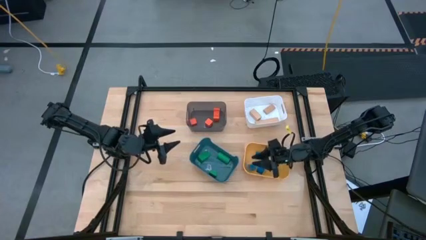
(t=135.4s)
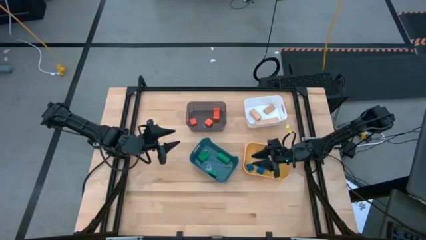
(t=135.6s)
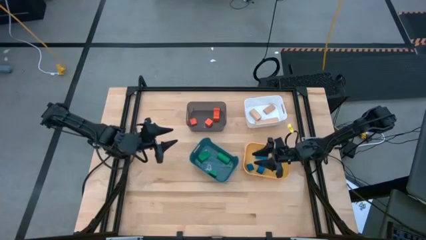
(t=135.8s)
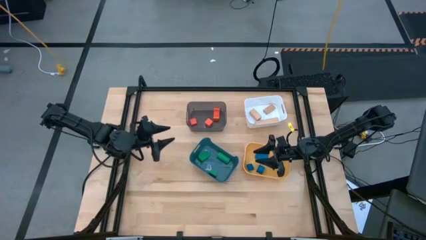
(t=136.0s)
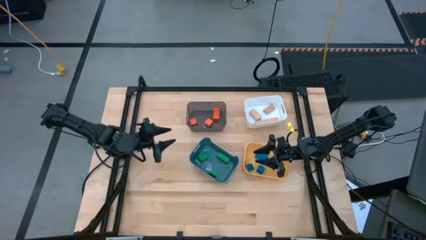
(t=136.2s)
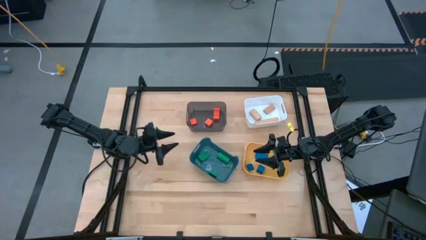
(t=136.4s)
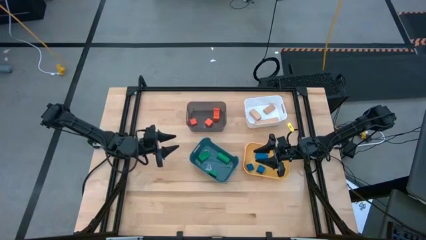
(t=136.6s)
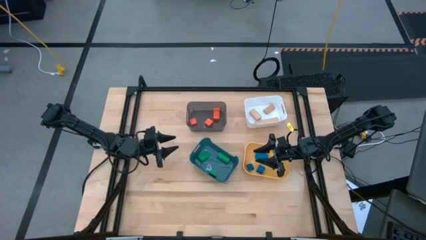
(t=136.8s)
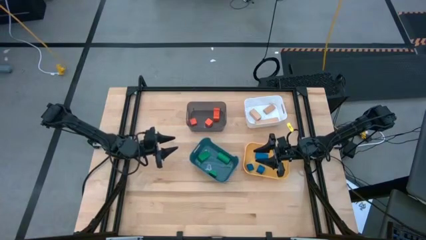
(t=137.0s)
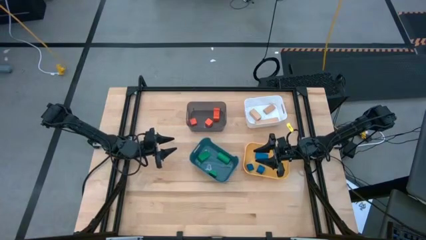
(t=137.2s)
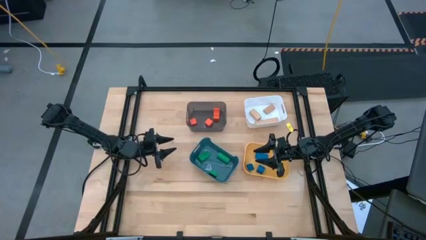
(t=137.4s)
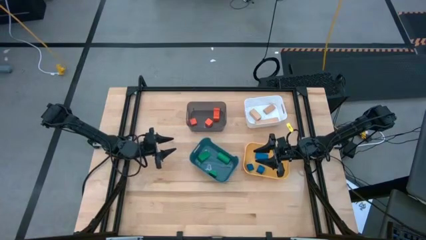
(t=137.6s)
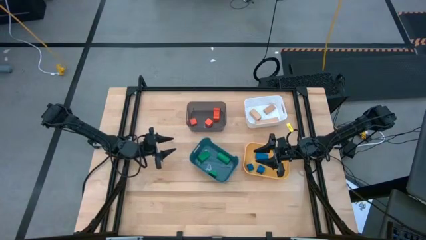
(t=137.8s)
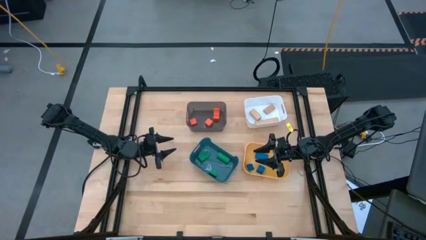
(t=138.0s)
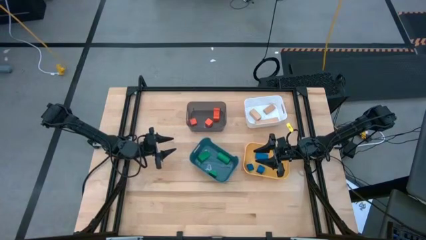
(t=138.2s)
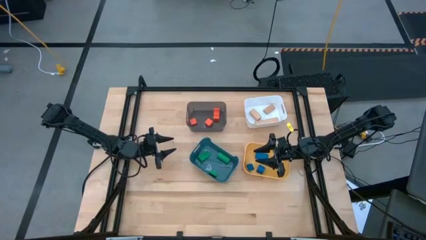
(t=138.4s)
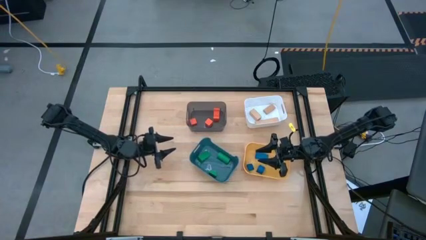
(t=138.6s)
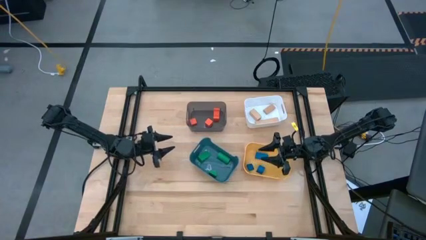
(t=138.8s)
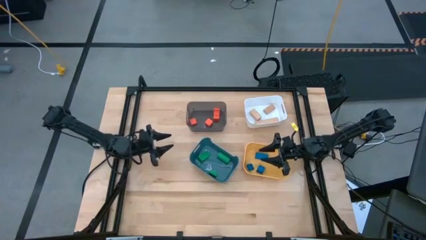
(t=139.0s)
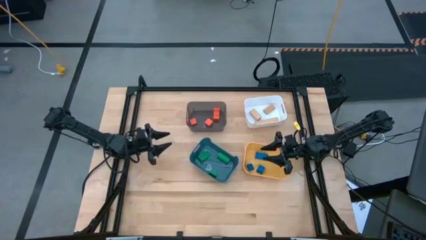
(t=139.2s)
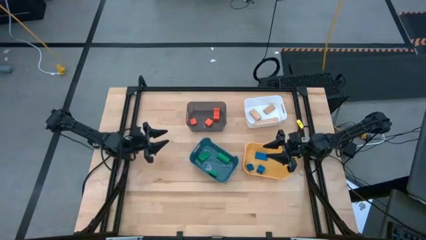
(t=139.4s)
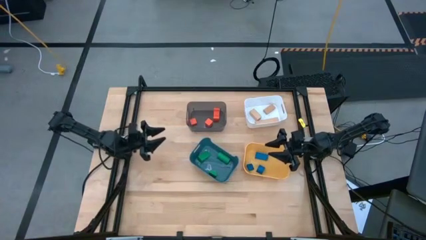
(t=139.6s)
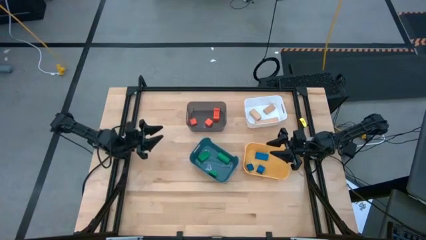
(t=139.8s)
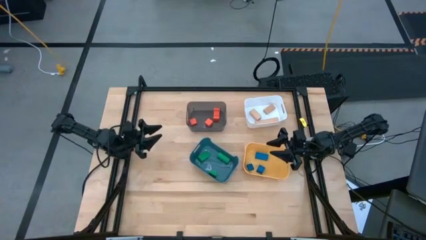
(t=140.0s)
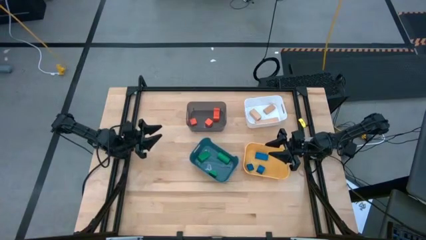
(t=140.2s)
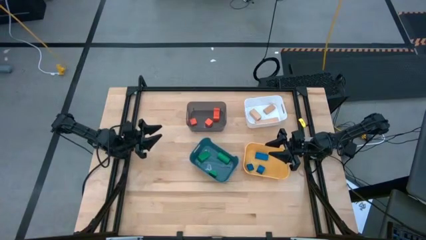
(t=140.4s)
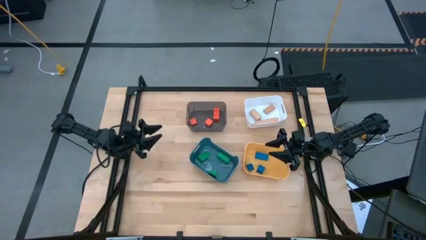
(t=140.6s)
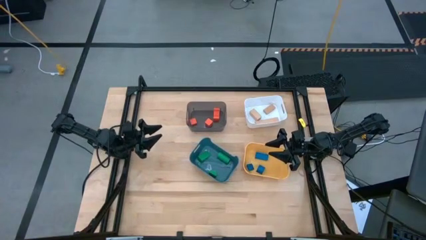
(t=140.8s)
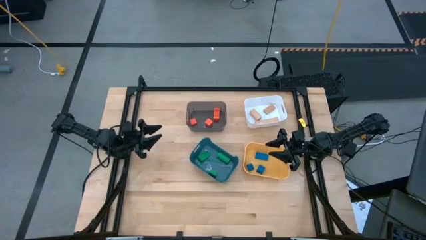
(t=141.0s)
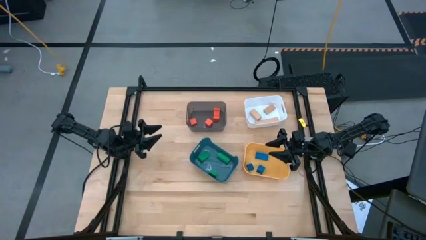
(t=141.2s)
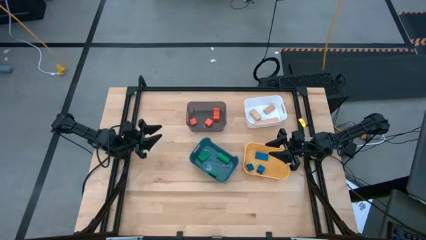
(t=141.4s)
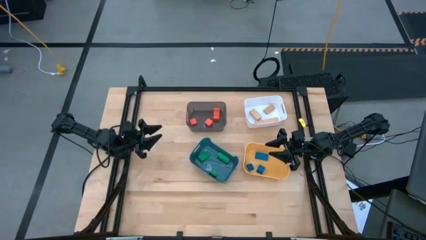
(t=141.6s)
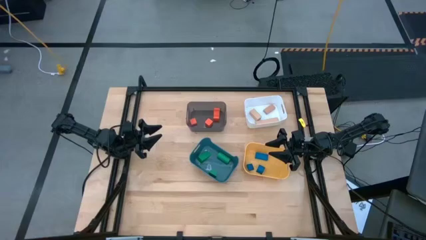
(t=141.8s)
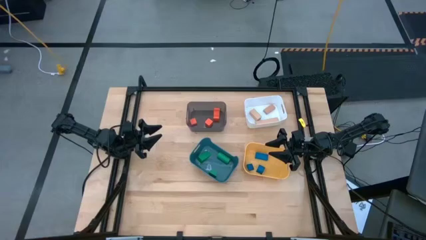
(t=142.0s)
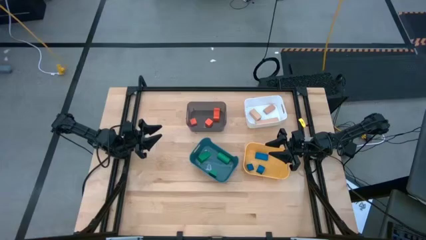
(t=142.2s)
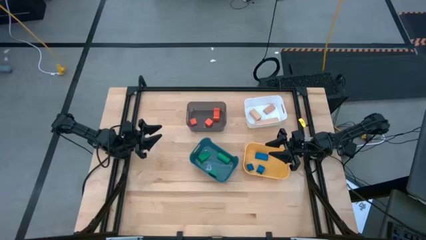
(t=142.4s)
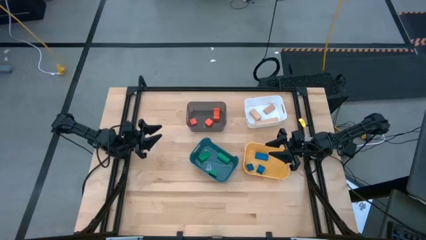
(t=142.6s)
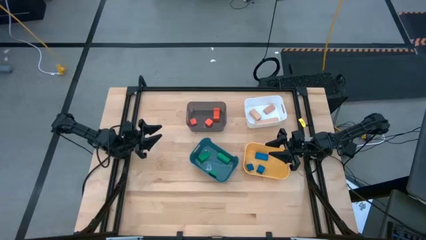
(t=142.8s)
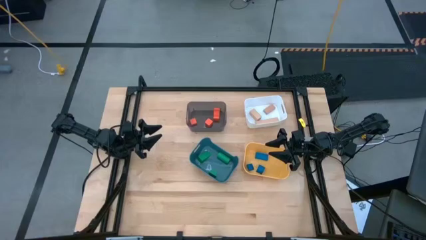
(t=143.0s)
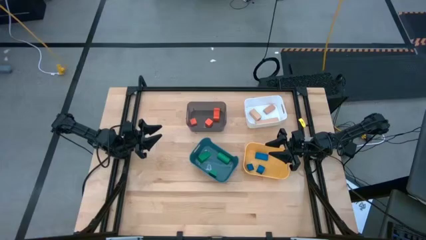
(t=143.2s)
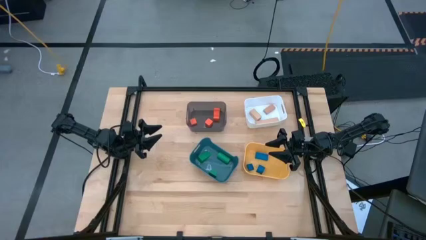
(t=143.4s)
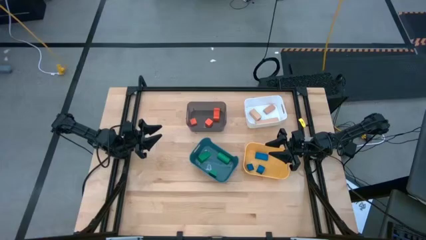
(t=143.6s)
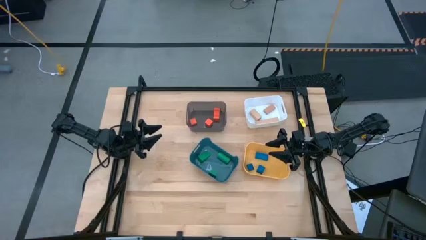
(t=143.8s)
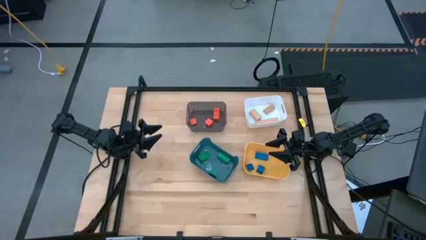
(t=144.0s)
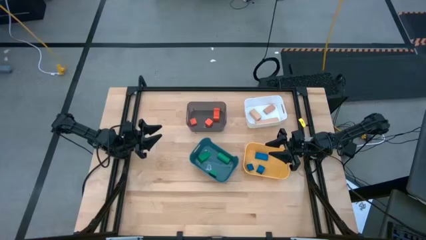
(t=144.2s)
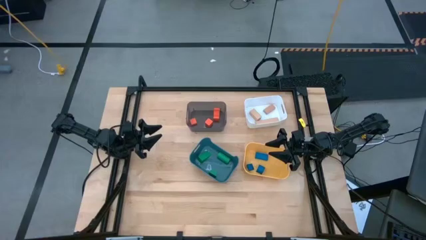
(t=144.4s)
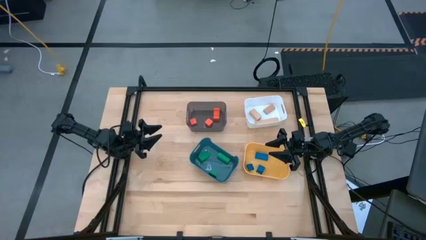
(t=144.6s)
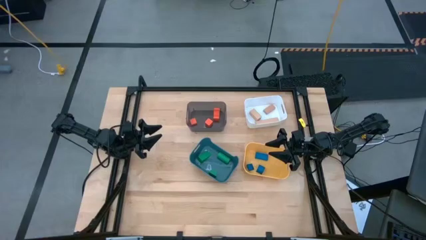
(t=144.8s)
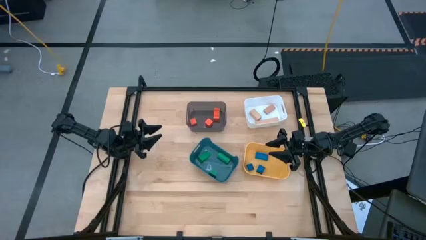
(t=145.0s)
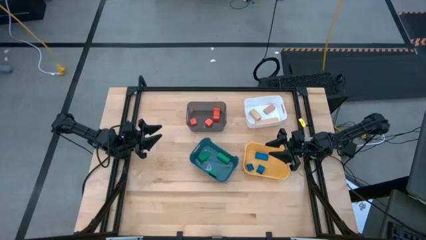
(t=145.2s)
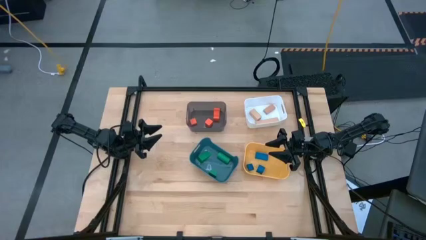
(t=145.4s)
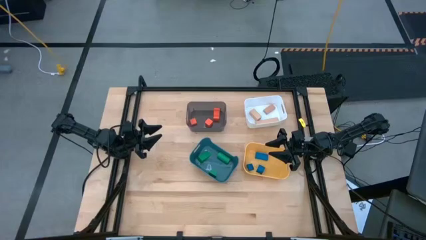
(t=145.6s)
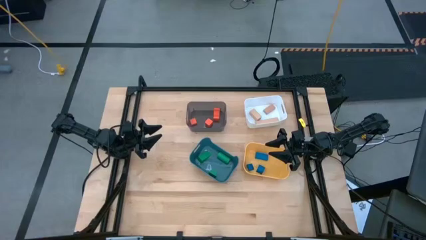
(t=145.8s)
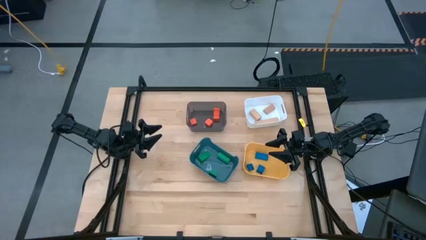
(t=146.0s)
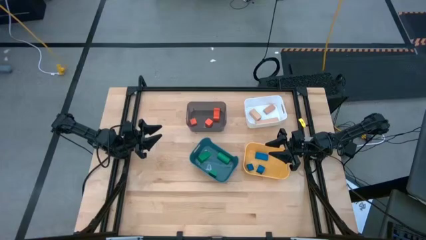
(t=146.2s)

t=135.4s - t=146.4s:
Task: Sort & place blocks by color
Return to Home Position

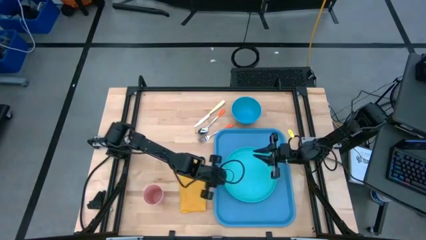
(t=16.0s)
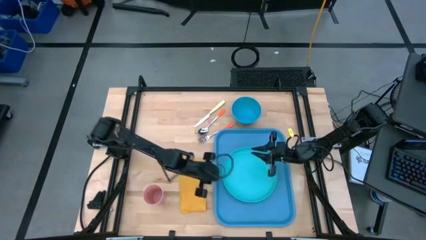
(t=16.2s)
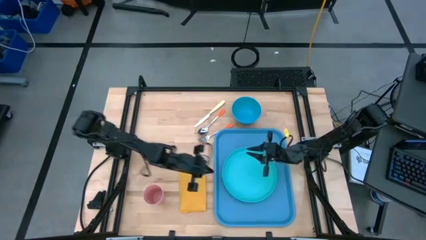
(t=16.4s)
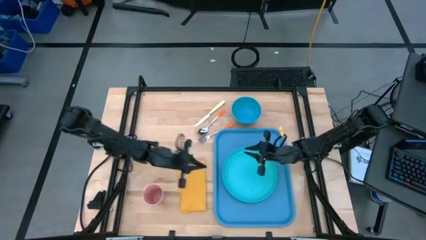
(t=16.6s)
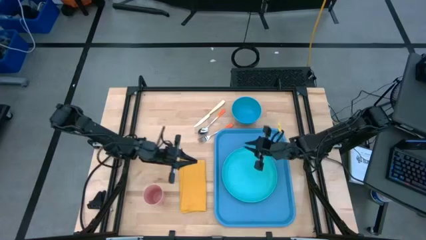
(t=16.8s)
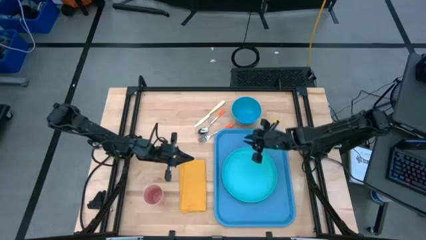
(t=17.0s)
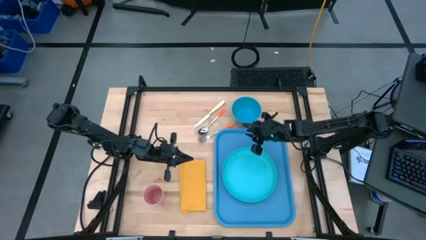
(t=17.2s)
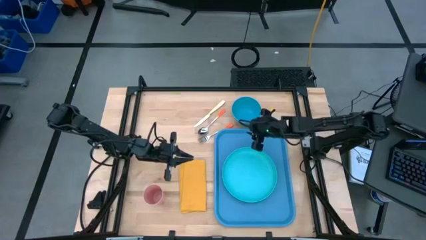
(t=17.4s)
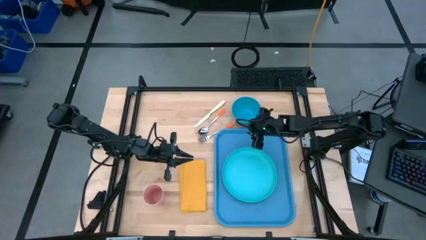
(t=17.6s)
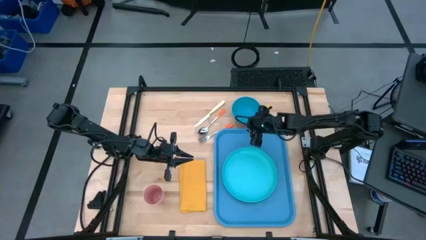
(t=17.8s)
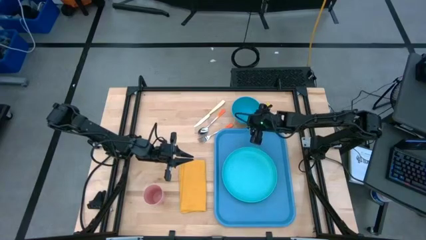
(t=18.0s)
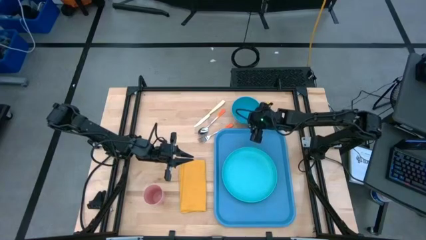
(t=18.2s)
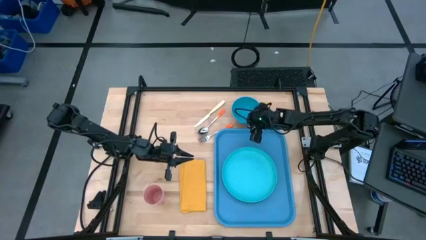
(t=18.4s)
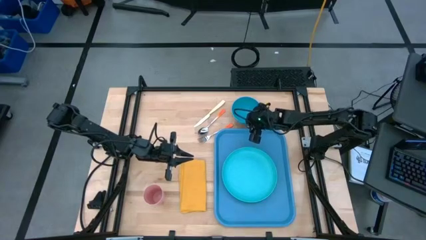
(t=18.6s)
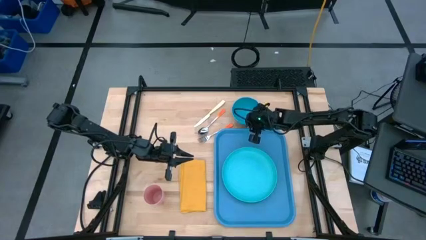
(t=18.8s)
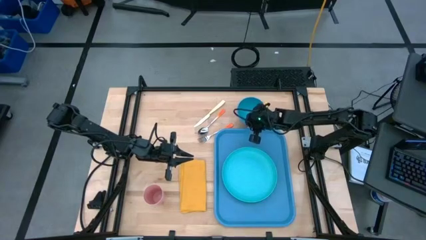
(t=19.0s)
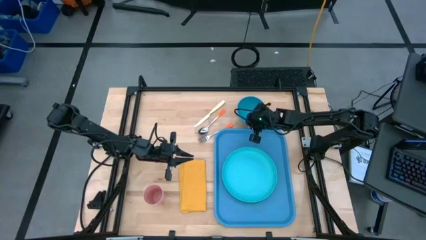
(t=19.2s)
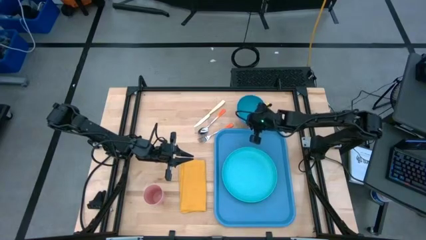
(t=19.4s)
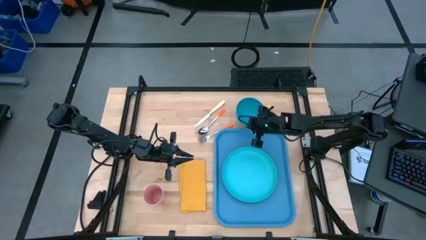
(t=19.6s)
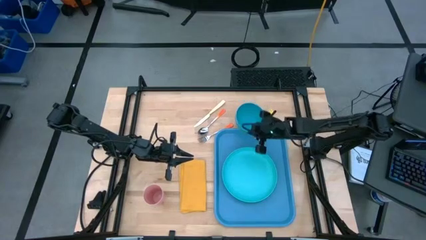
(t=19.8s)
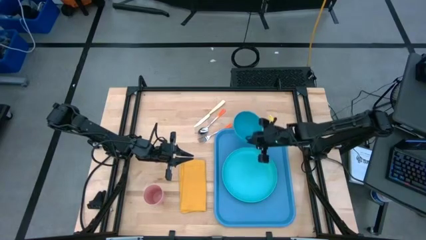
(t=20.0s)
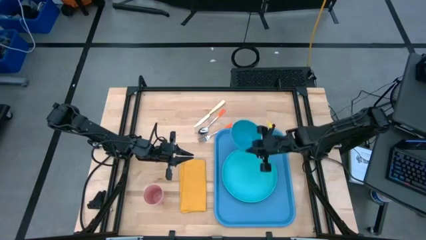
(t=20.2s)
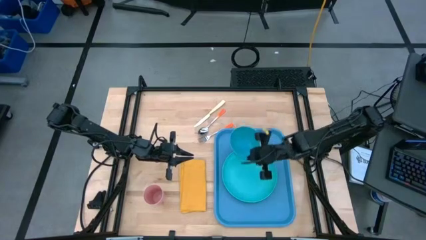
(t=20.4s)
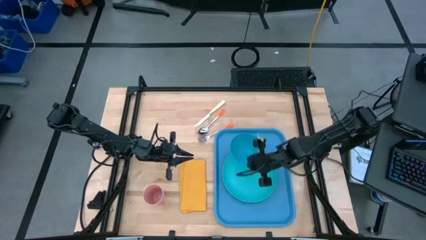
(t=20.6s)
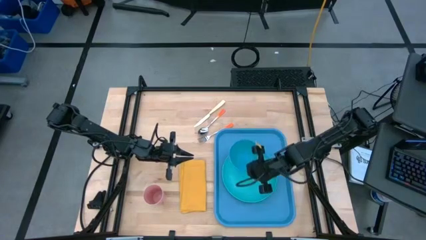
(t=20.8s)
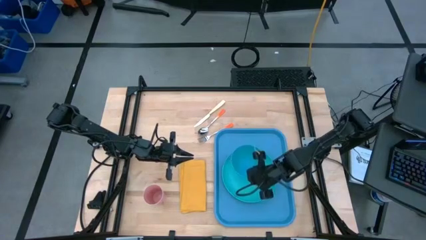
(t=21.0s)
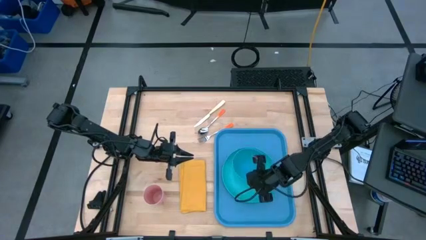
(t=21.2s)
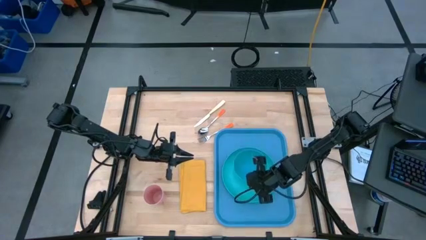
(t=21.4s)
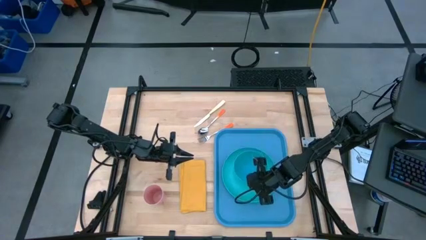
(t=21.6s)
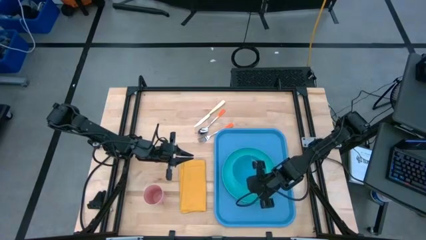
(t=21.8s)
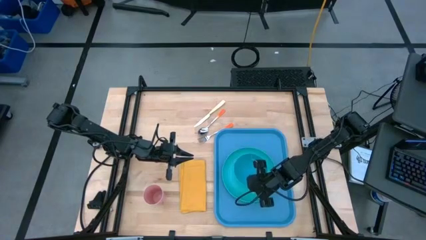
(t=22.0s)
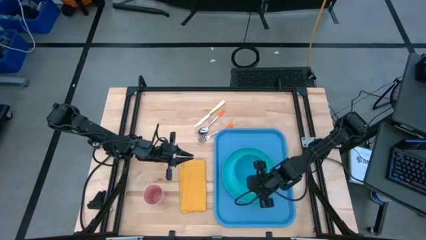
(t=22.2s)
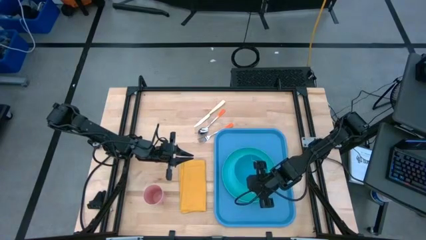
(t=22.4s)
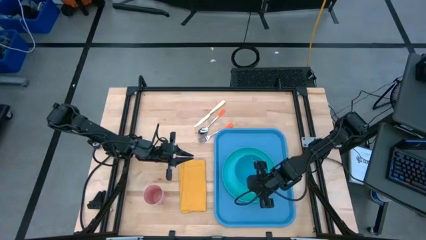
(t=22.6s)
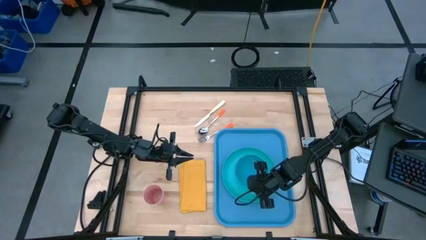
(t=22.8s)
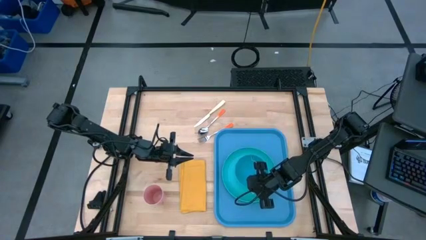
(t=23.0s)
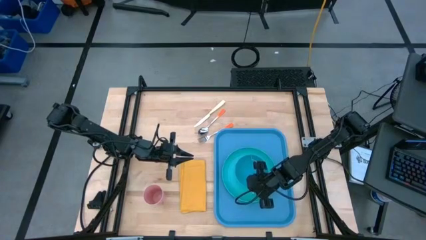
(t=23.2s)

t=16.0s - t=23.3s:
Task: Set up tray
Put the blue bowl on top of the light blue plate on the blue tray
